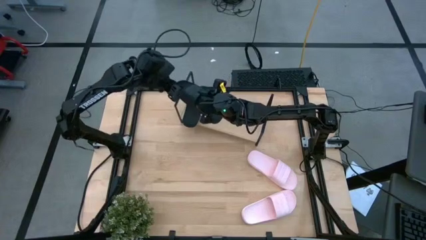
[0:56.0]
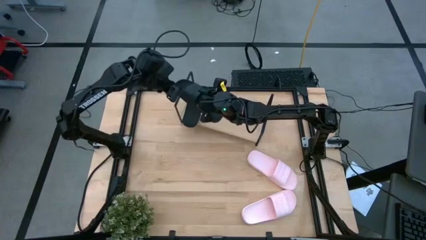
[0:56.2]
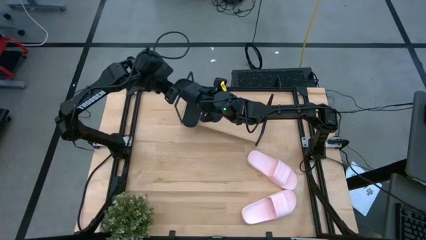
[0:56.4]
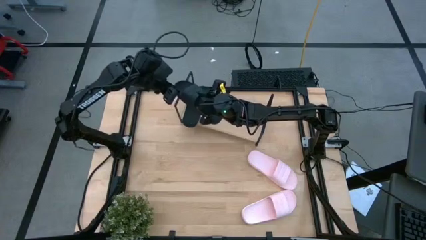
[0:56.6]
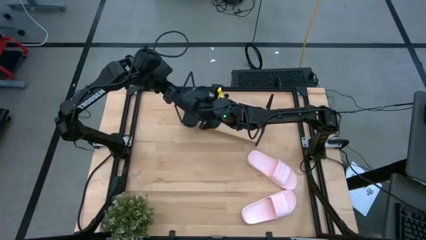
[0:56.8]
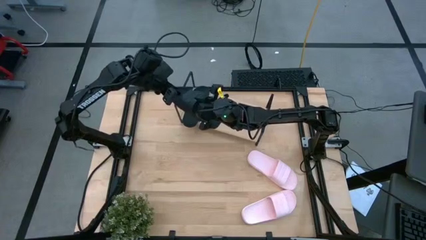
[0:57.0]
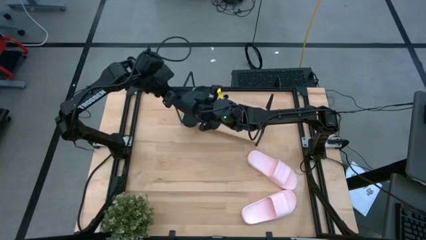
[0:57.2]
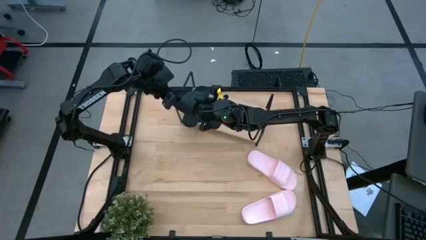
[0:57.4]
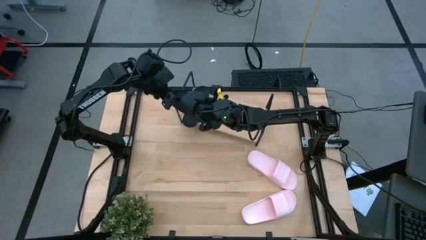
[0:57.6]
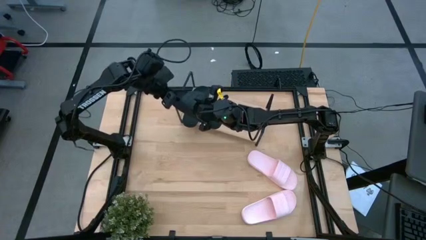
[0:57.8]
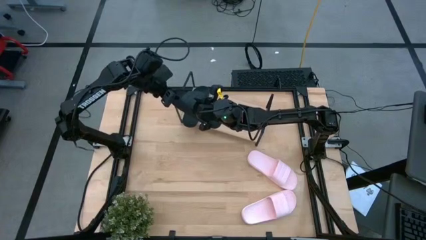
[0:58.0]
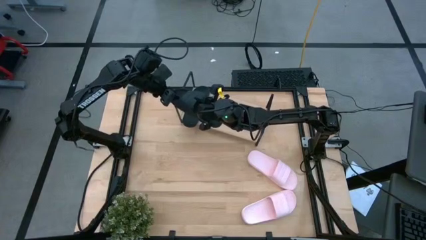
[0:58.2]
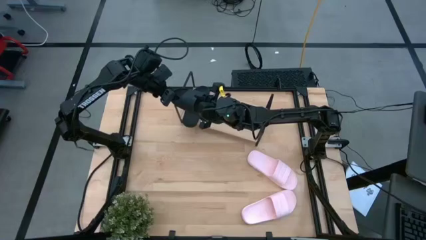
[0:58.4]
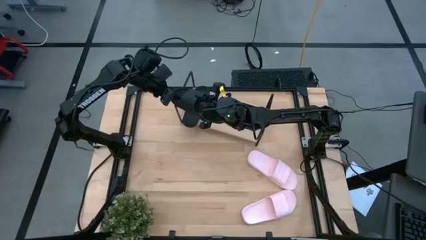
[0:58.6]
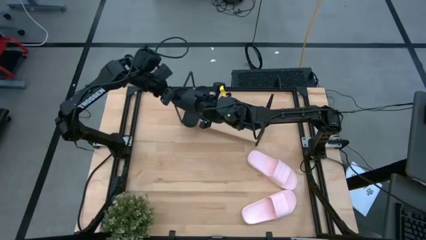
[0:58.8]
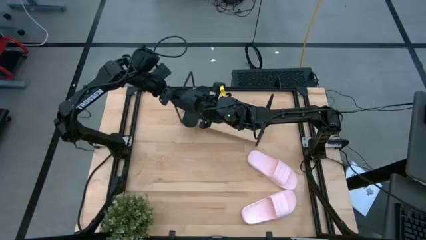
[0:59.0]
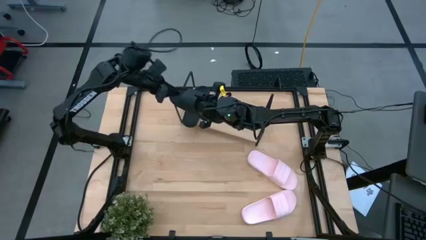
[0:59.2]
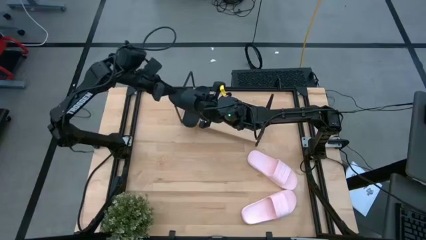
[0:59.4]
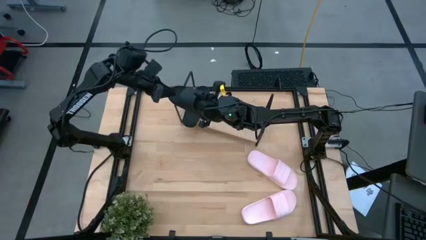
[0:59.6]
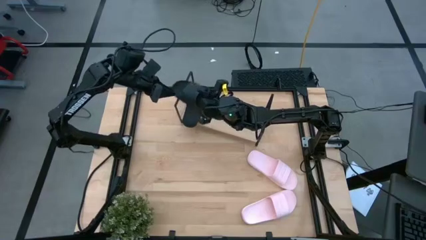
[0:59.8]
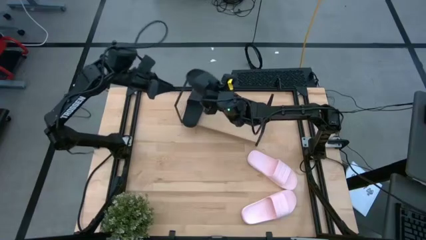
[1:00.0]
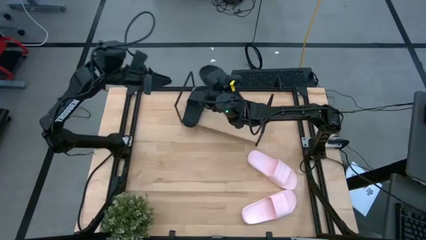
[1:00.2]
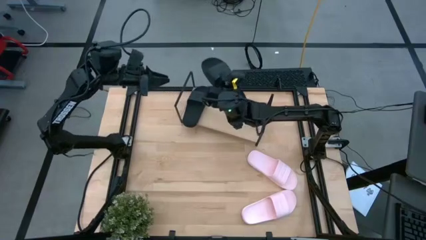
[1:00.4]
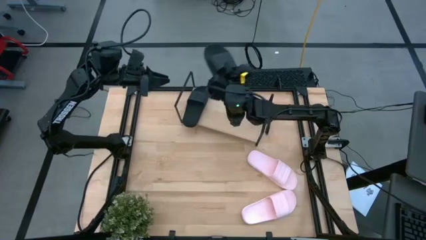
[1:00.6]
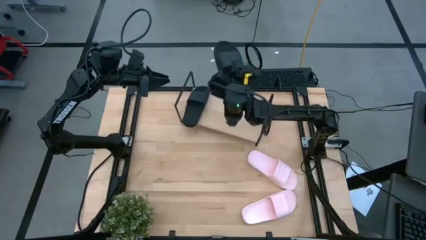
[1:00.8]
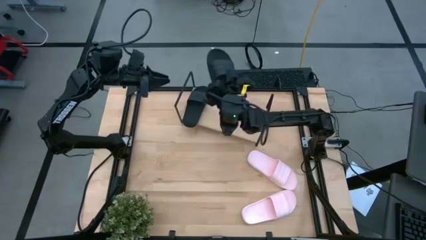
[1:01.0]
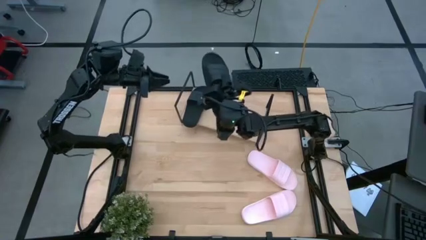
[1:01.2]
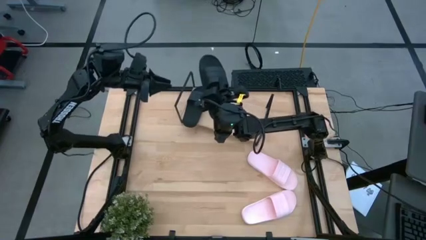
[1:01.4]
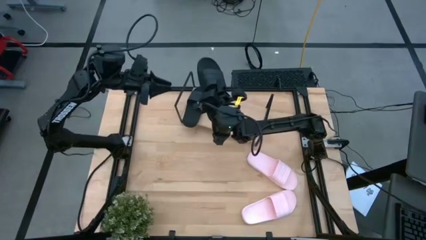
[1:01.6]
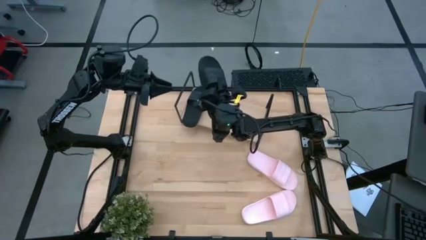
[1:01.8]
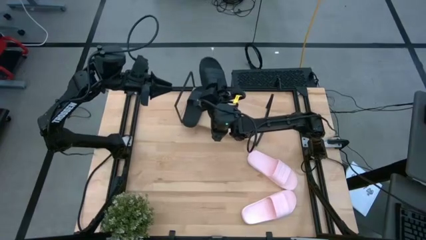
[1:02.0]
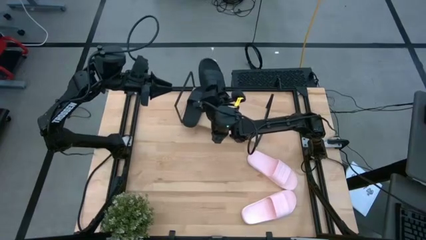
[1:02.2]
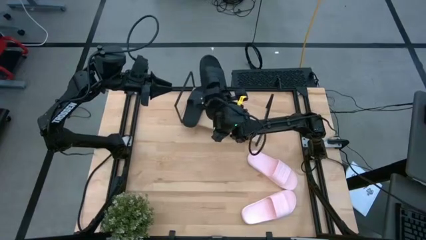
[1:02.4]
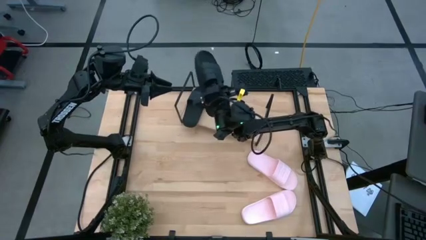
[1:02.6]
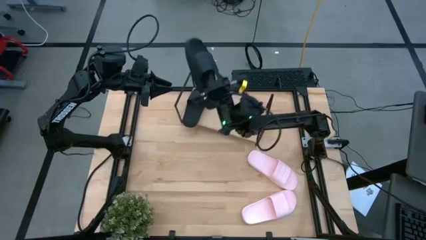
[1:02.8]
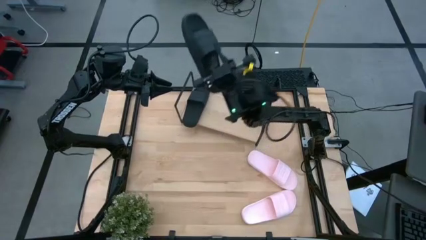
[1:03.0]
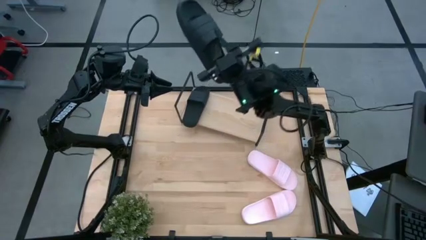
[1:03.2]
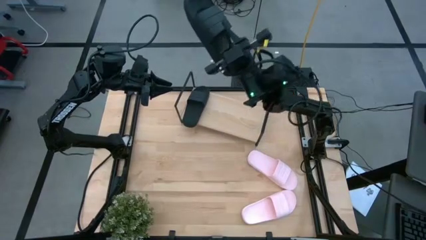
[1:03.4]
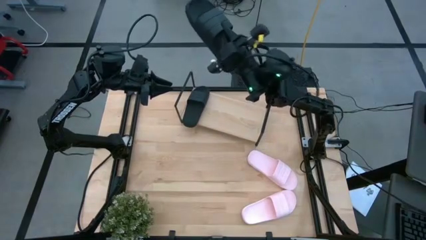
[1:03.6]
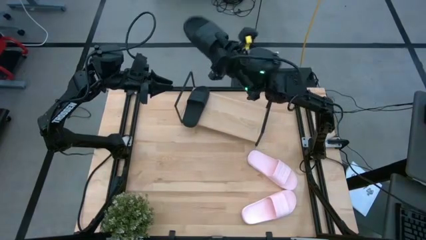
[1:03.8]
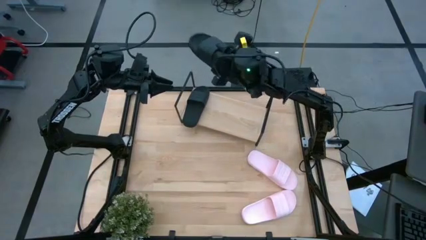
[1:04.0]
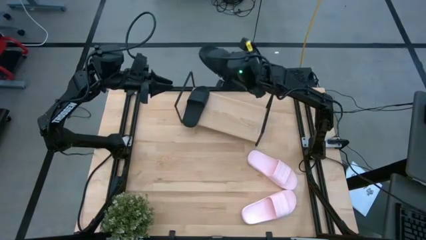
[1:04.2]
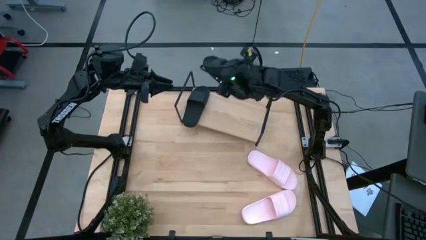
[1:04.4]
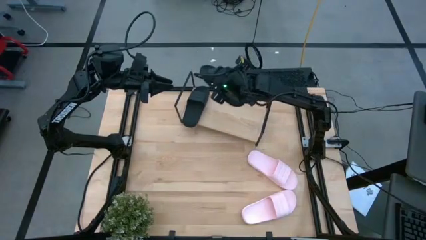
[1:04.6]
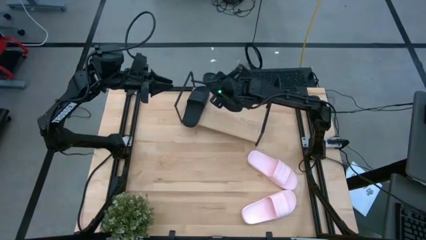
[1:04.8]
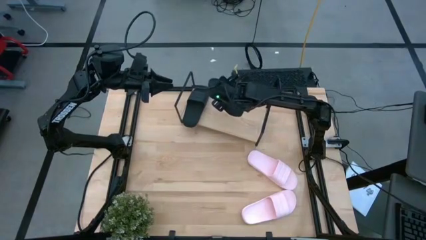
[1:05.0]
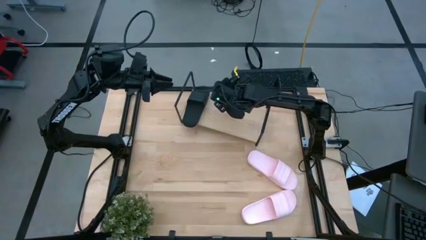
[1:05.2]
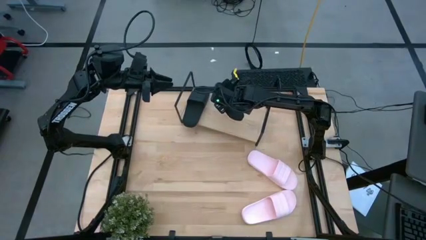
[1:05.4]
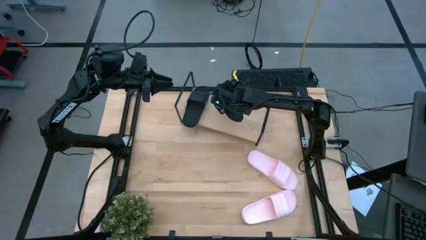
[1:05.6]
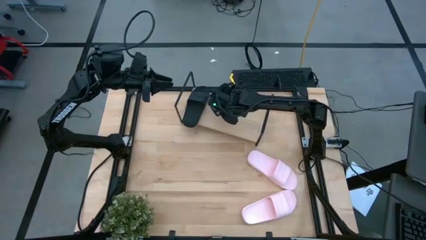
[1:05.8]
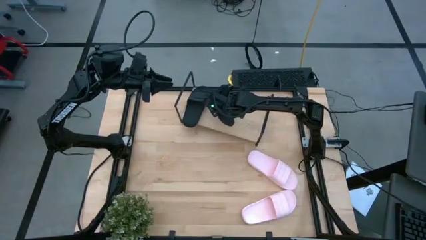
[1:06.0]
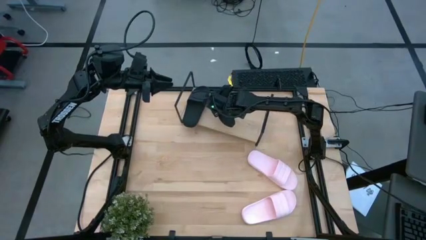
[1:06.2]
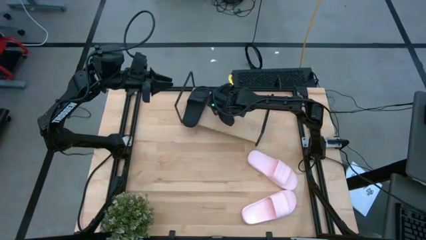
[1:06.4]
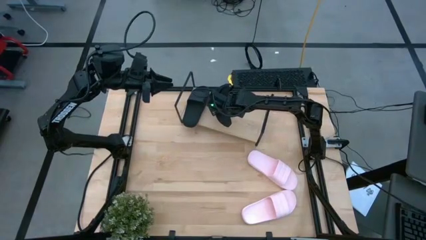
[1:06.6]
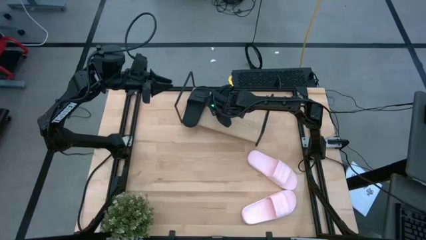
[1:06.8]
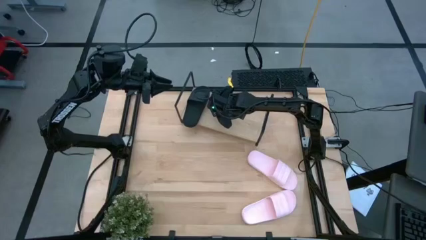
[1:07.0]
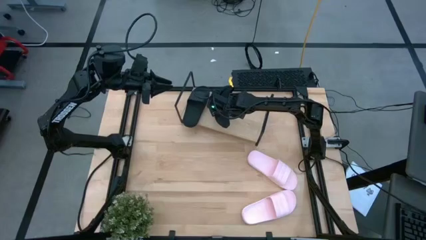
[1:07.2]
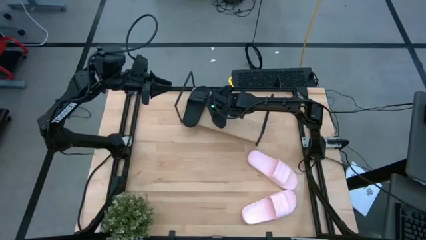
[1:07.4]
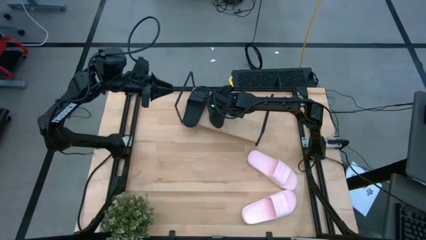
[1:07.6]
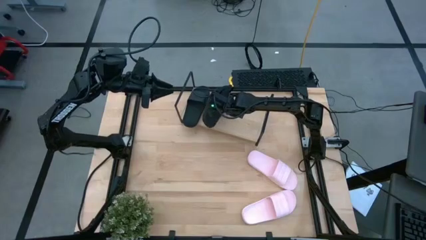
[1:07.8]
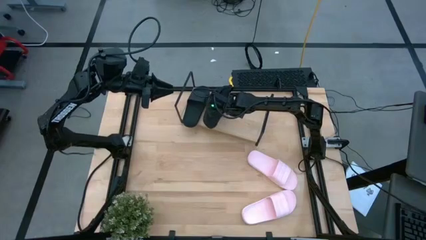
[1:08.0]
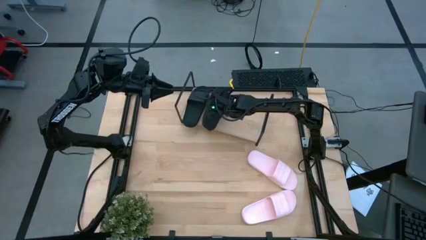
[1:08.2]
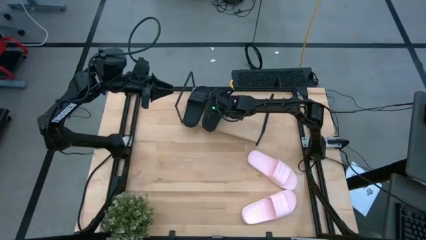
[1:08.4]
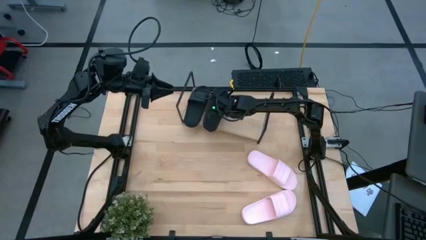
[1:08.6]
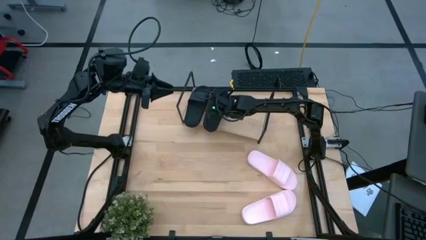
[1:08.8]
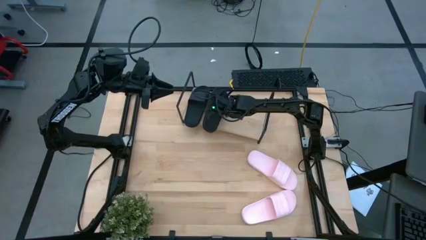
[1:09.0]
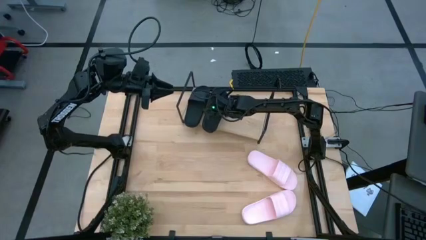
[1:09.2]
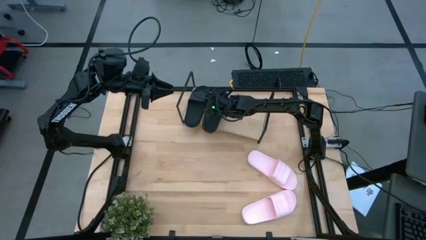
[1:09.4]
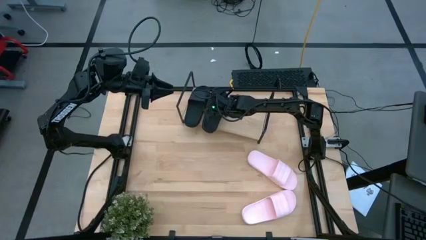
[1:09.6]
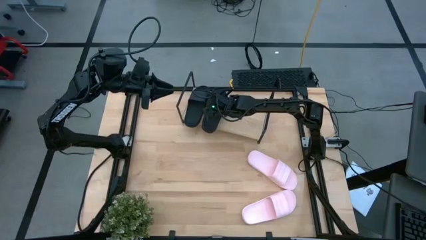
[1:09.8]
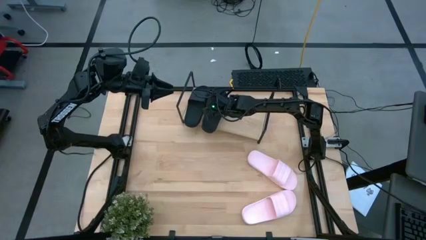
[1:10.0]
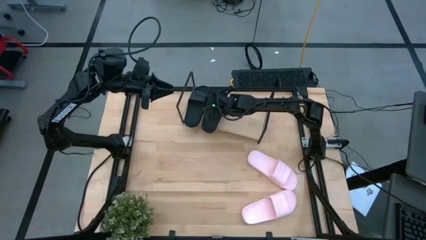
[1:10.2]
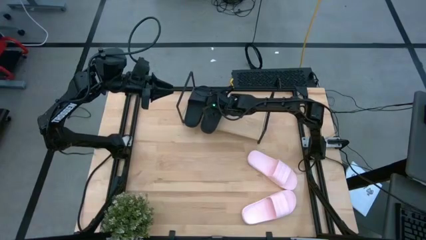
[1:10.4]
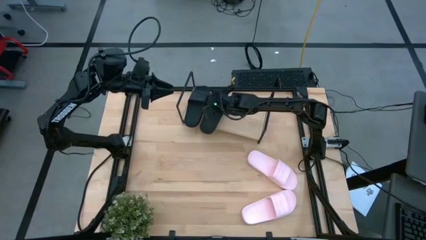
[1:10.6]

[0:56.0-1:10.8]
Task: Pick and place slides into the shelf
Put the black slipper on the shelf

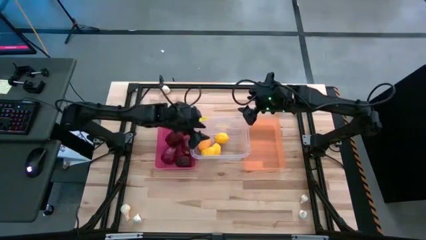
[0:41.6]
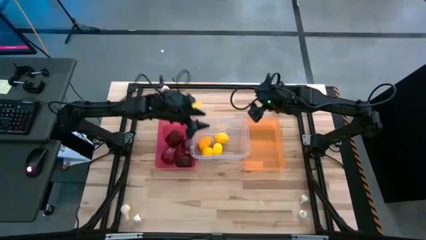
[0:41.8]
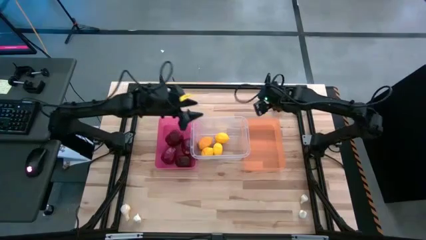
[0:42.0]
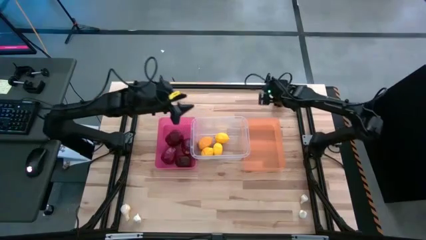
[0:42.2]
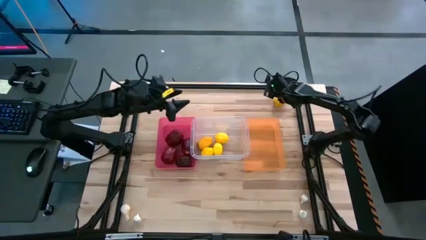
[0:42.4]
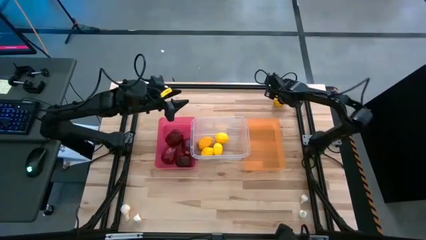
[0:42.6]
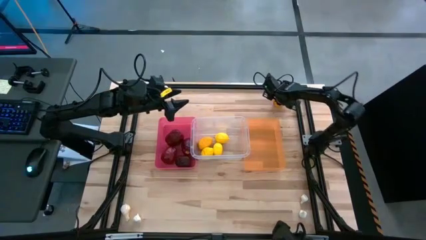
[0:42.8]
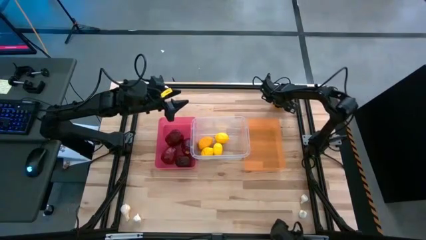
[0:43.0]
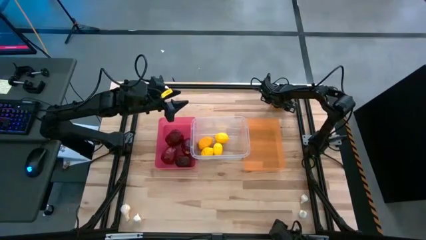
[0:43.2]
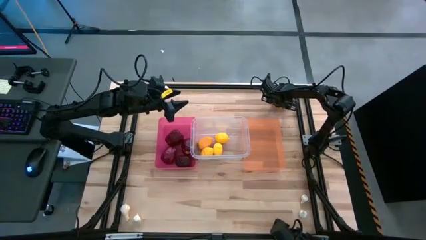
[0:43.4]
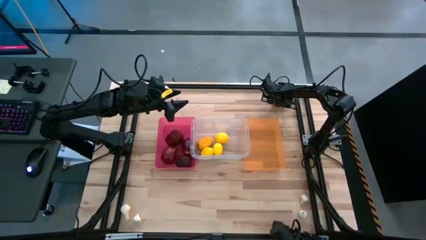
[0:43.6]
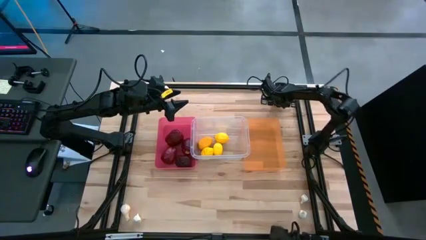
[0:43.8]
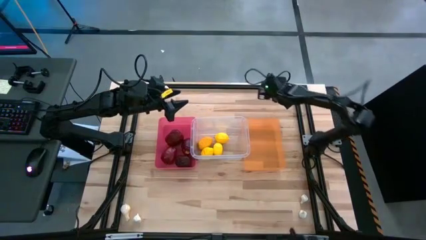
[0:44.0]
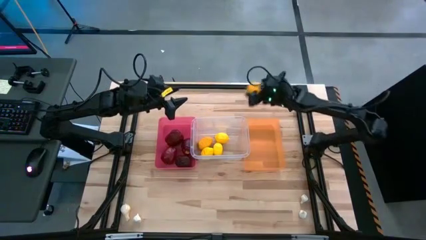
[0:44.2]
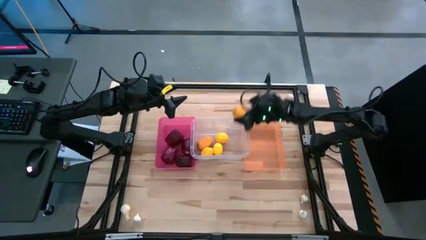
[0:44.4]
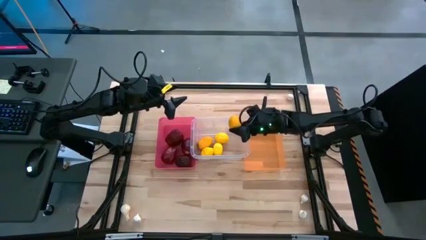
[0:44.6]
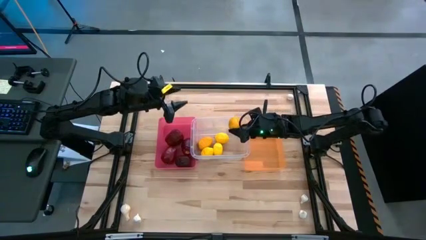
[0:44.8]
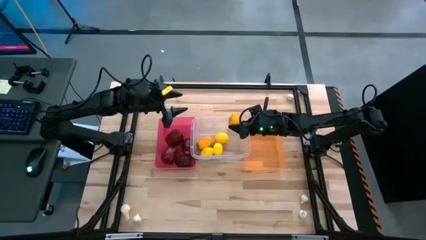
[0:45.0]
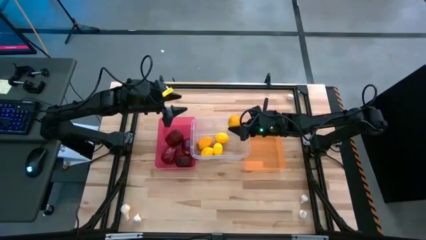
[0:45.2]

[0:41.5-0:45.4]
Task: Sort produce into baskets
Put the yellow lemon into the transparent bin
